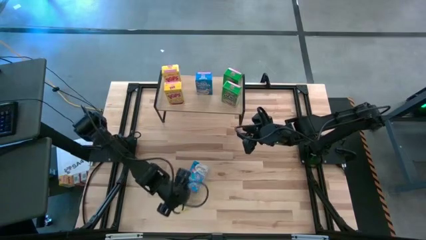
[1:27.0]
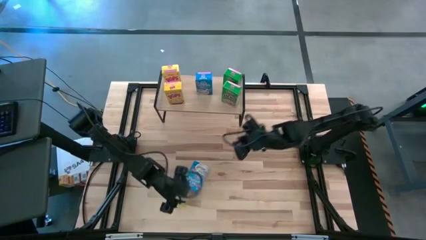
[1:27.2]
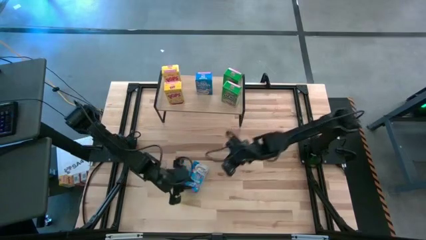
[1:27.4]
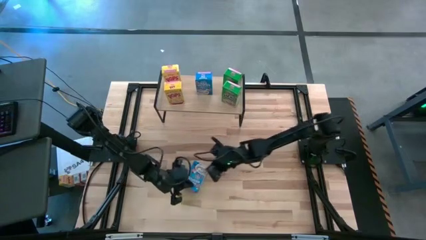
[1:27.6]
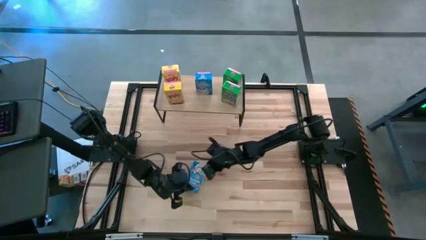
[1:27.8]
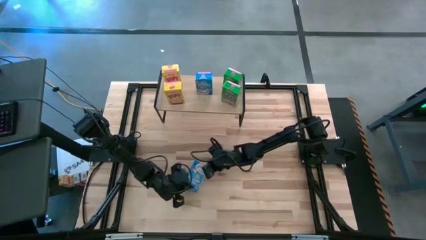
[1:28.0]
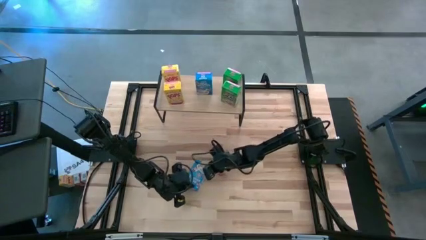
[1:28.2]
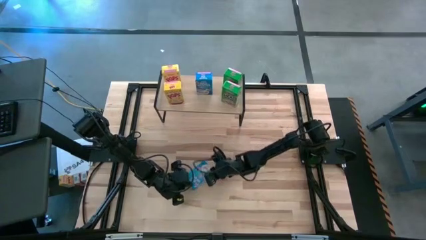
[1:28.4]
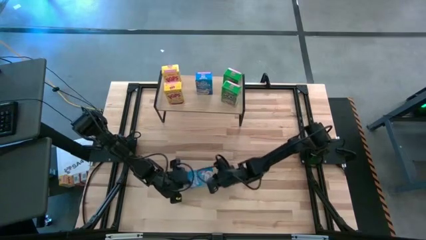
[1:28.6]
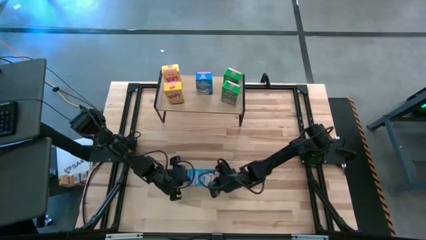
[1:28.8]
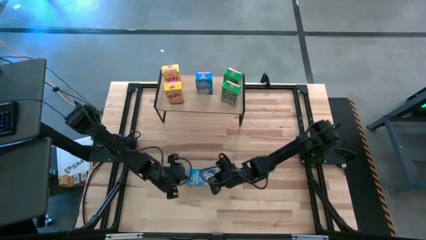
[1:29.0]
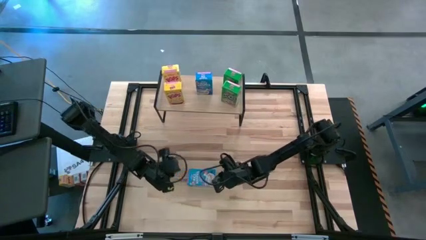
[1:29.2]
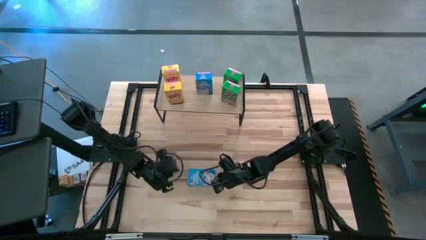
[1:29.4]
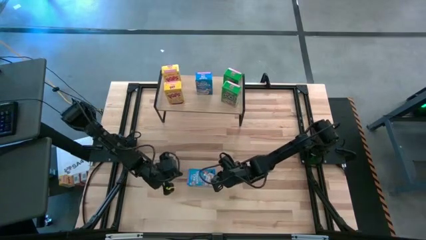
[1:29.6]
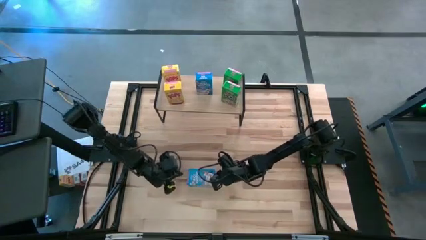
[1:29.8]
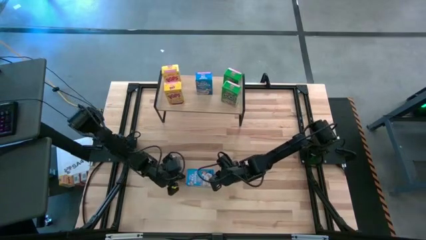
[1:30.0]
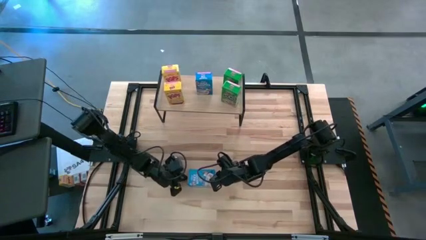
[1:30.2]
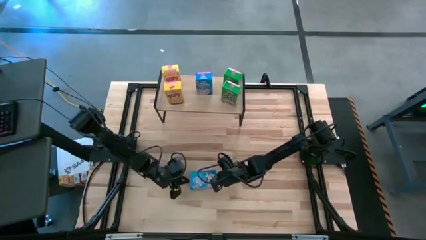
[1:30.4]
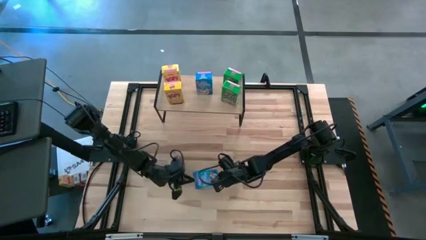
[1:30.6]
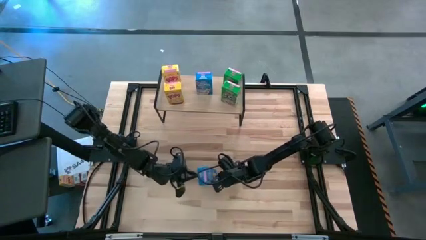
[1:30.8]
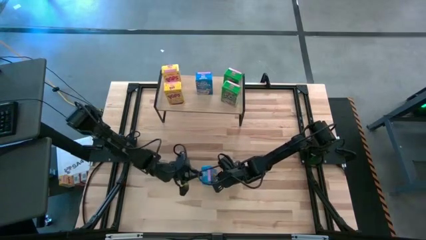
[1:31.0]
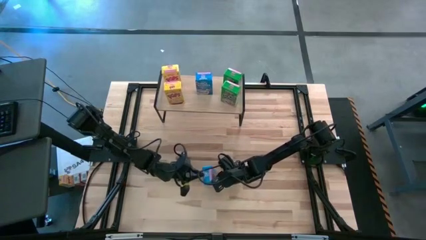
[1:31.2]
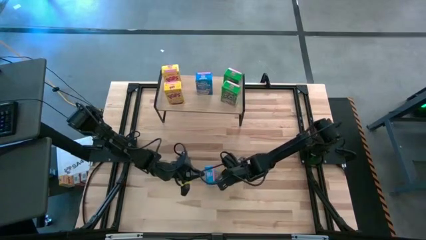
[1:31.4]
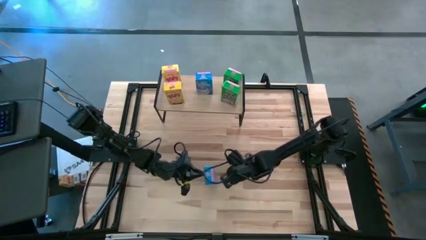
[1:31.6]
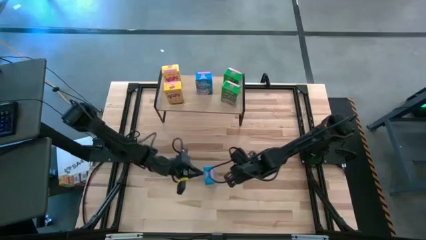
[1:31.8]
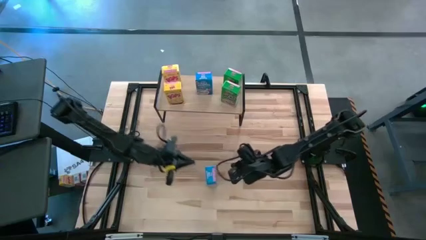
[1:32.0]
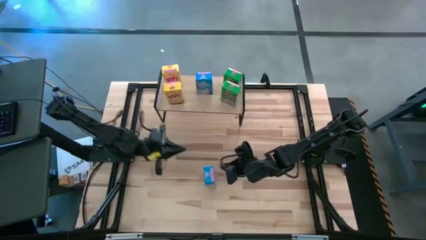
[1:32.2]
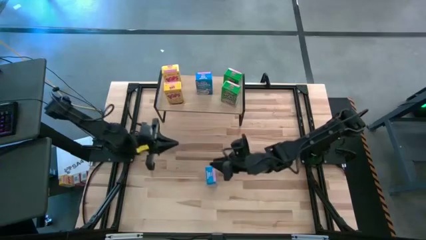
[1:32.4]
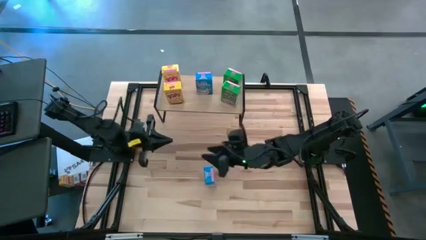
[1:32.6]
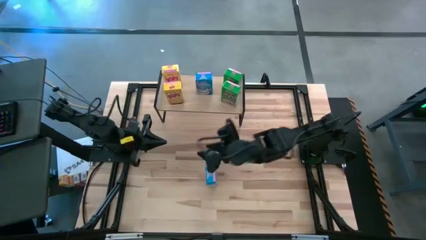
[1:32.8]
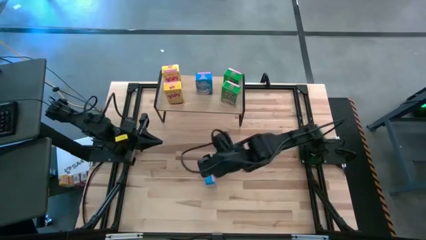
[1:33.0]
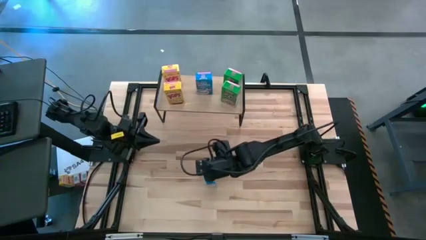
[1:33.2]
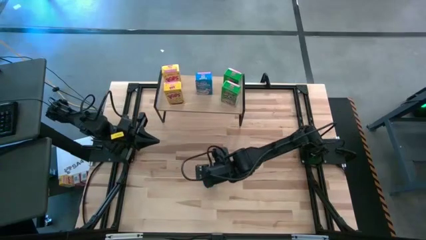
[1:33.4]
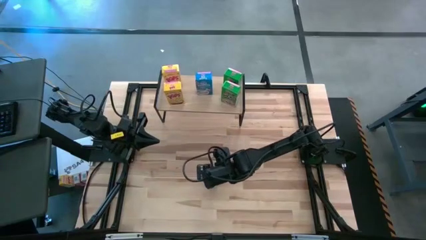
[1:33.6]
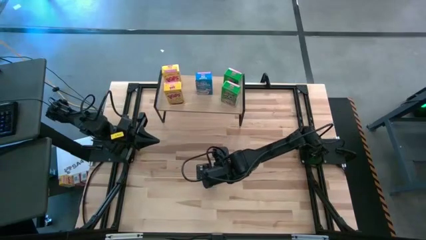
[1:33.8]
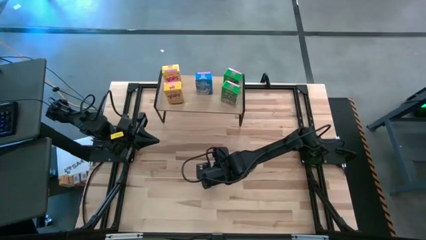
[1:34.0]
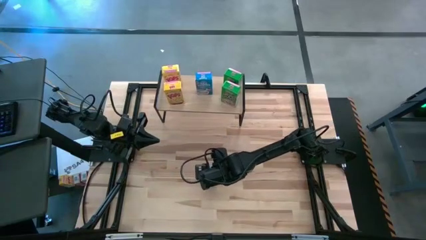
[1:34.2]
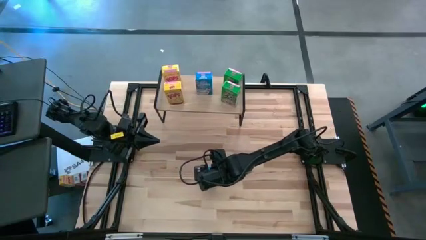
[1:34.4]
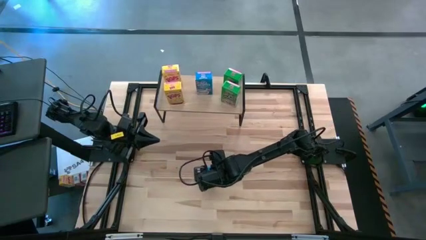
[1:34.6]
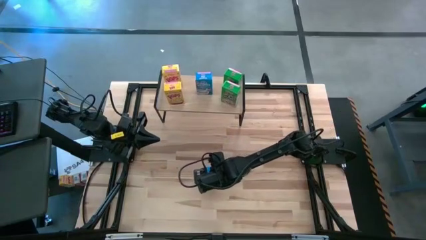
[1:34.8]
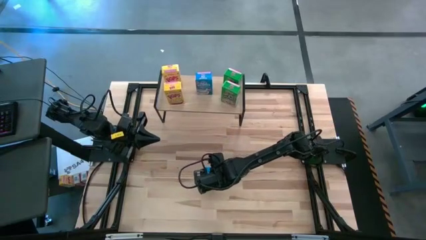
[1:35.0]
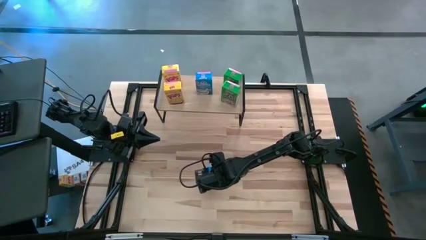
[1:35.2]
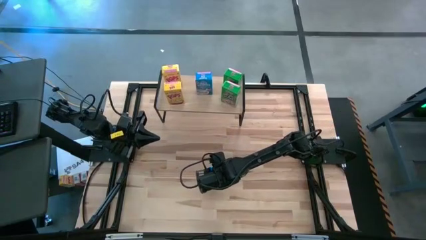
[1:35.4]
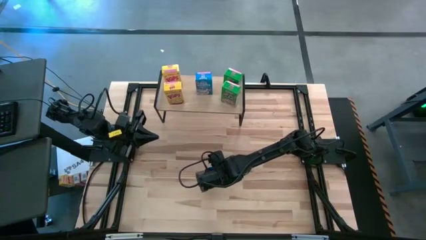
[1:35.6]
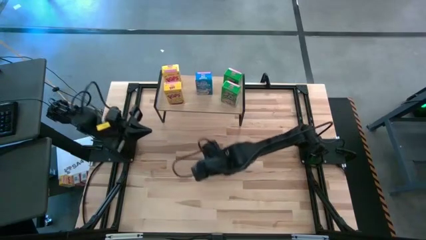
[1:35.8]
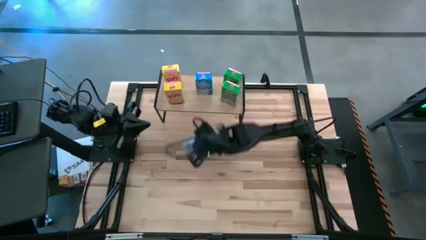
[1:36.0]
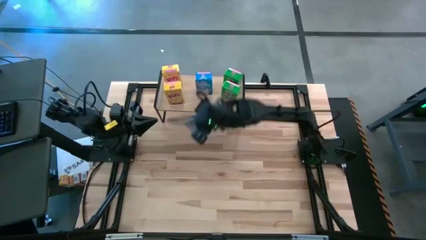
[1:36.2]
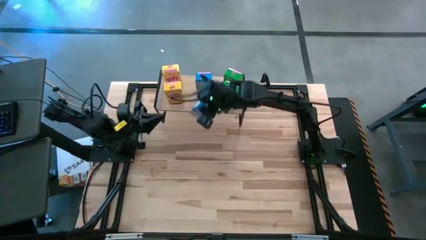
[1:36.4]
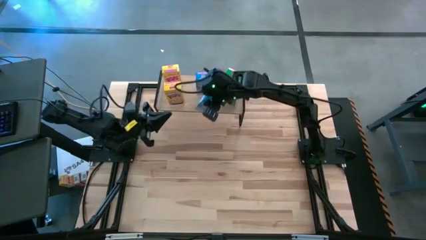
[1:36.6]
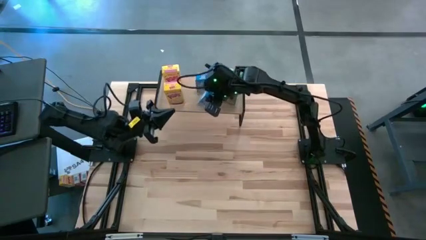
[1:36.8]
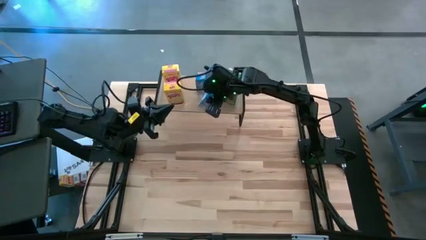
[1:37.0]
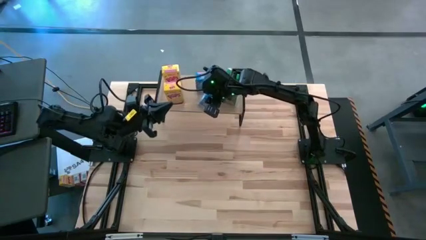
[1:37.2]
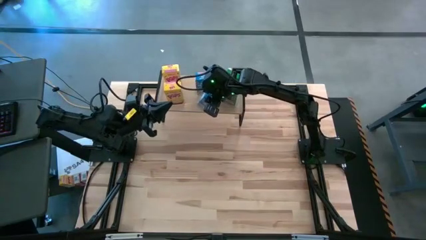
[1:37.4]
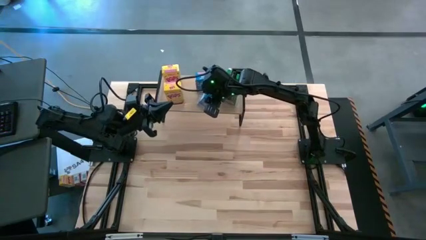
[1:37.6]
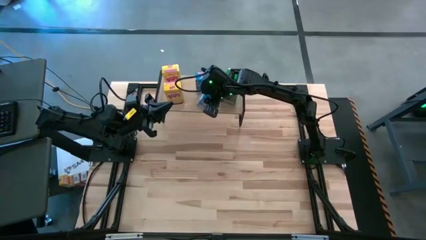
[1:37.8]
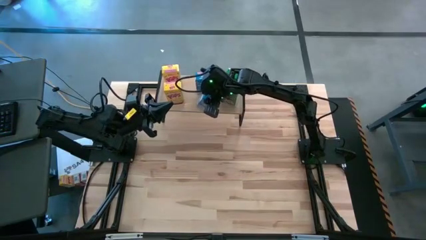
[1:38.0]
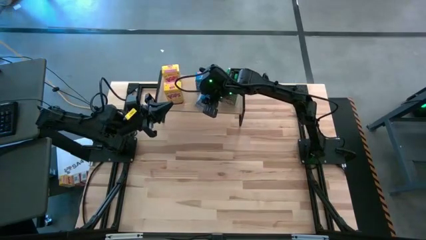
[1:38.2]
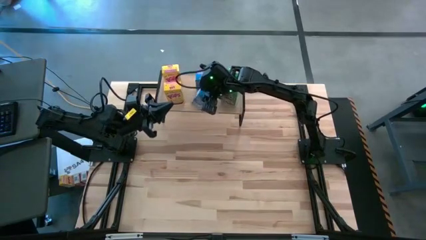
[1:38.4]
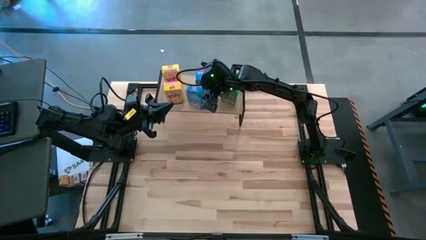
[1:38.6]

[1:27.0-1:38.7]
Task: Stack cereal on shelf
Put the blue cereal box on the shelf aligned with the other blue cereal box

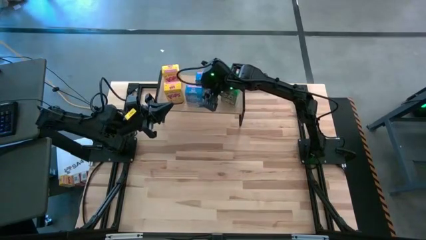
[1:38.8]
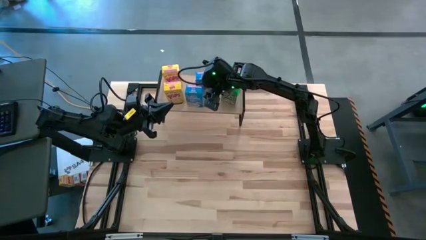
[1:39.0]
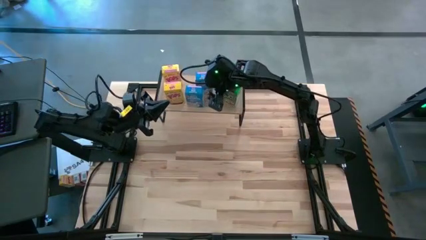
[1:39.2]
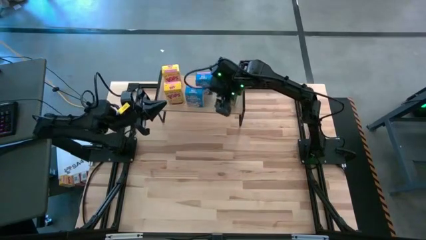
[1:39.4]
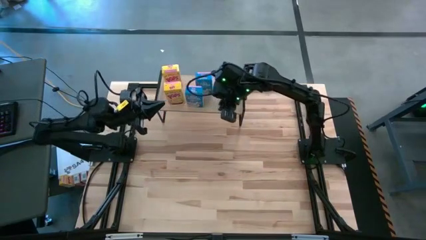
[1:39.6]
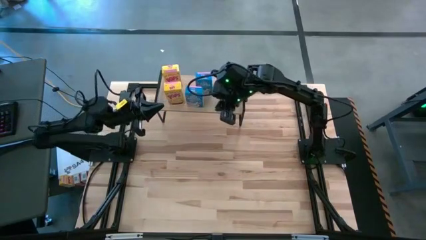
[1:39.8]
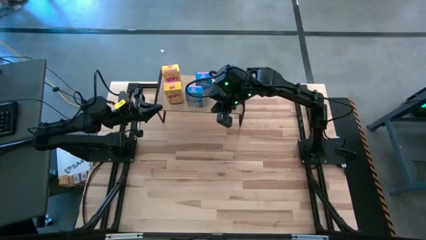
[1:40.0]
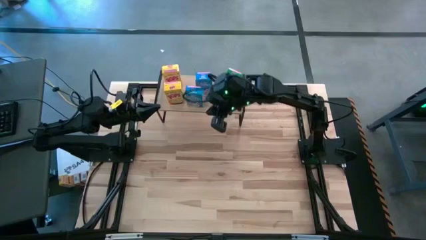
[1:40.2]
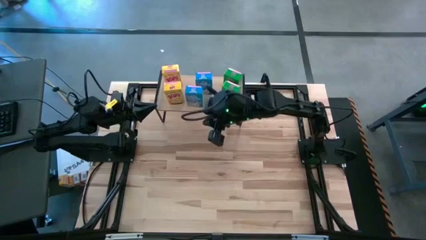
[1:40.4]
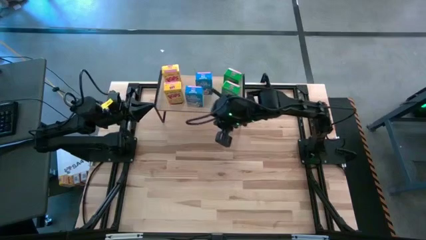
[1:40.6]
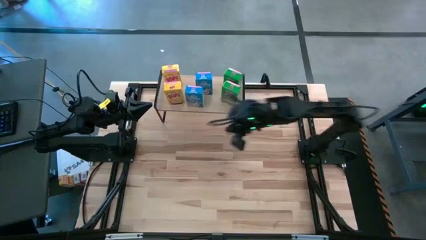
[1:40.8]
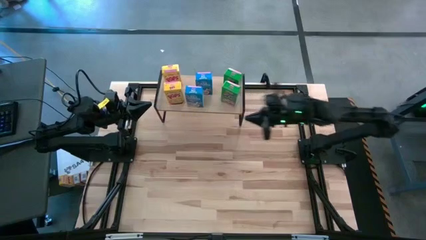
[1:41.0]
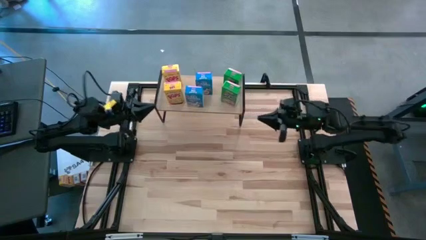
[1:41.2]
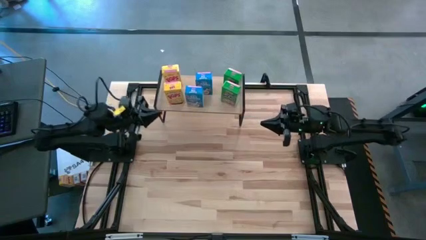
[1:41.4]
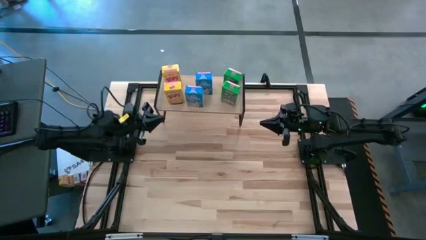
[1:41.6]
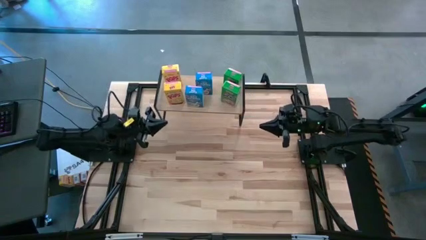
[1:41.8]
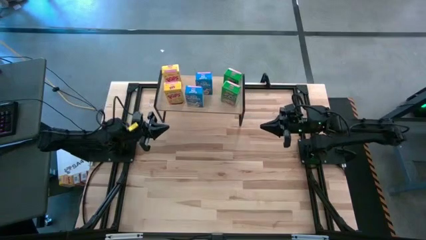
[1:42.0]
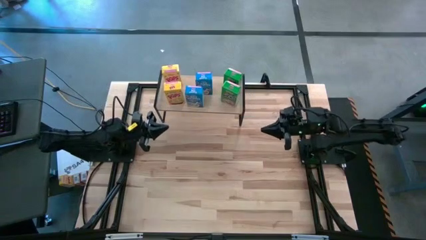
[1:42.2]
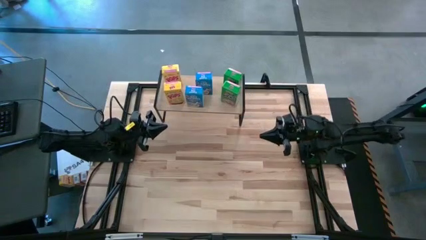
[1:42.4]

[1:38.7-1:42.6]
Return to Home Position
